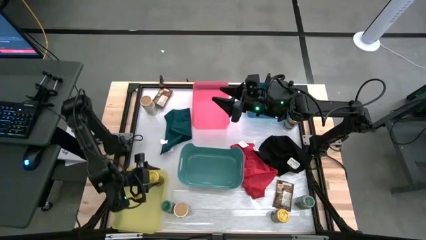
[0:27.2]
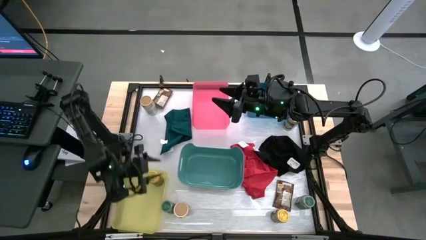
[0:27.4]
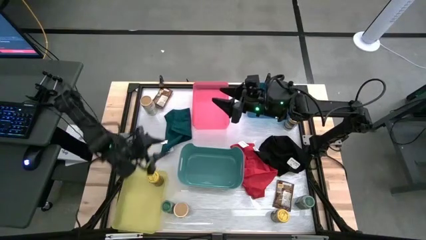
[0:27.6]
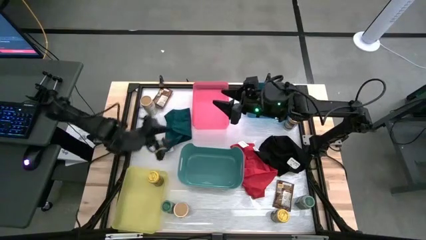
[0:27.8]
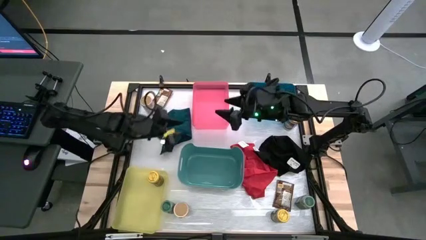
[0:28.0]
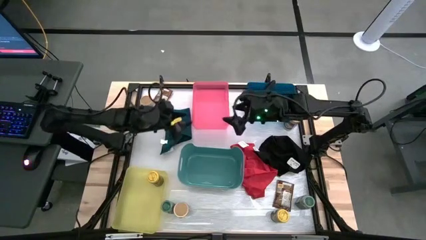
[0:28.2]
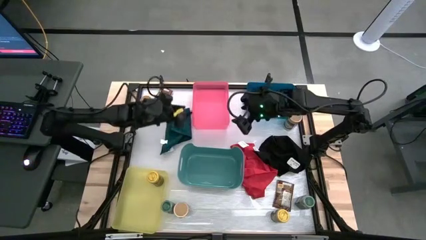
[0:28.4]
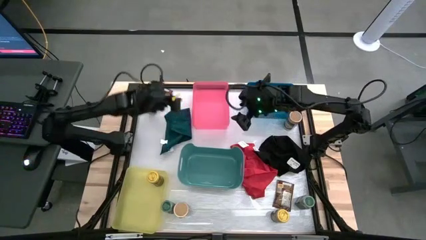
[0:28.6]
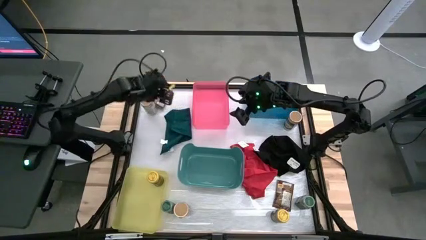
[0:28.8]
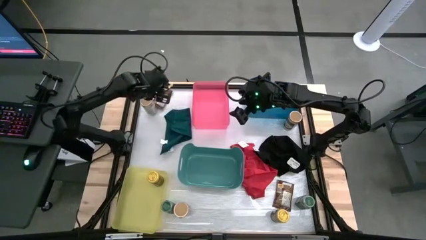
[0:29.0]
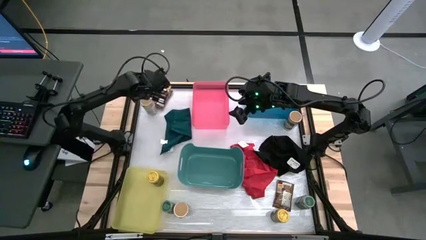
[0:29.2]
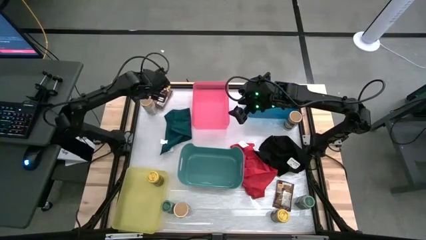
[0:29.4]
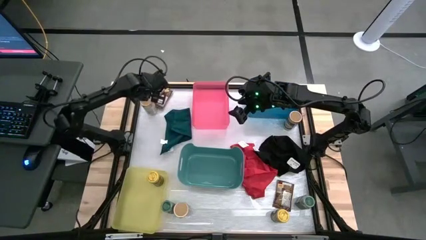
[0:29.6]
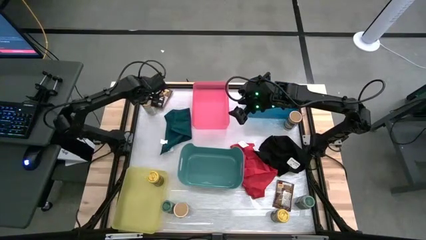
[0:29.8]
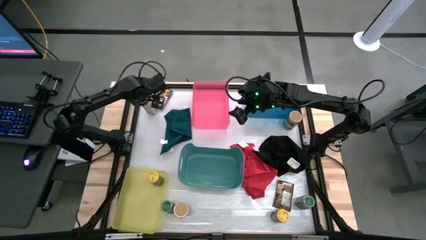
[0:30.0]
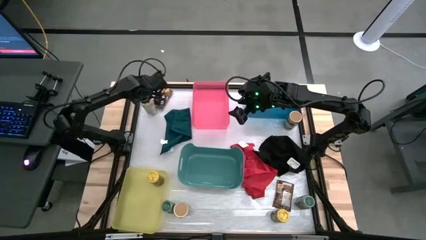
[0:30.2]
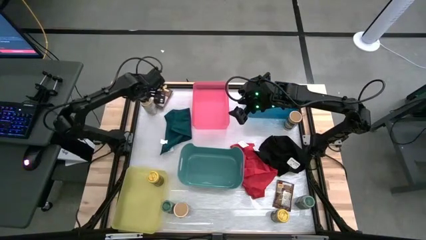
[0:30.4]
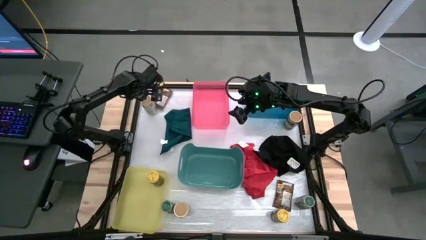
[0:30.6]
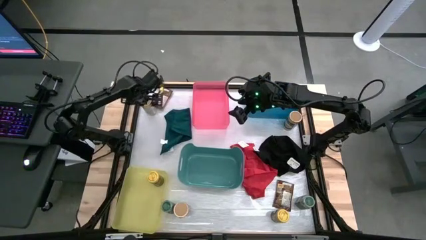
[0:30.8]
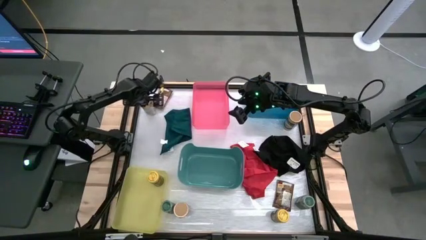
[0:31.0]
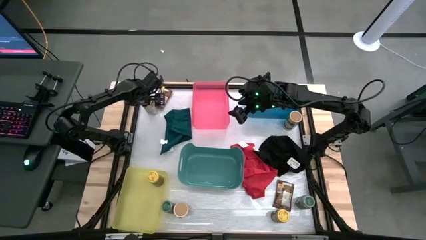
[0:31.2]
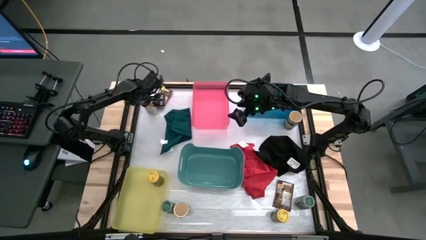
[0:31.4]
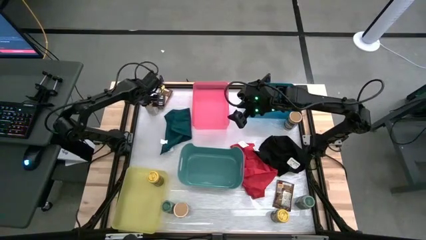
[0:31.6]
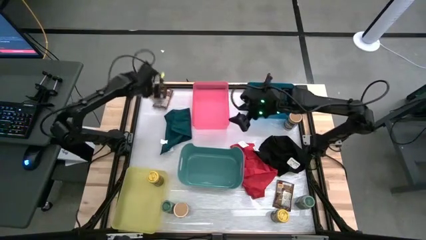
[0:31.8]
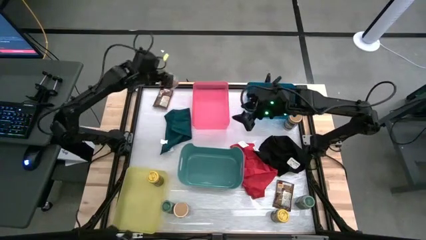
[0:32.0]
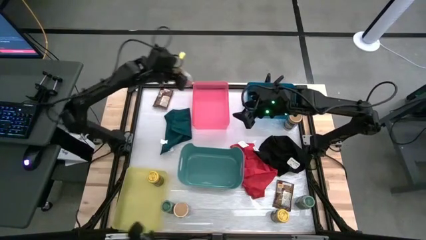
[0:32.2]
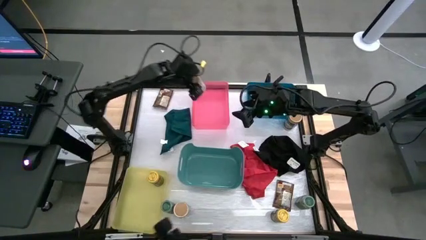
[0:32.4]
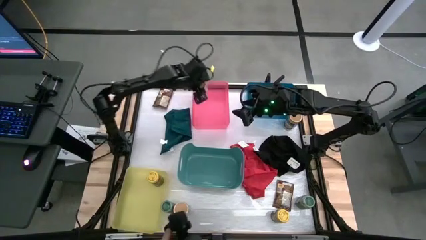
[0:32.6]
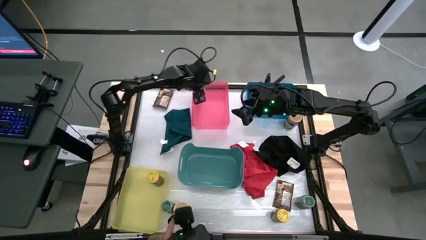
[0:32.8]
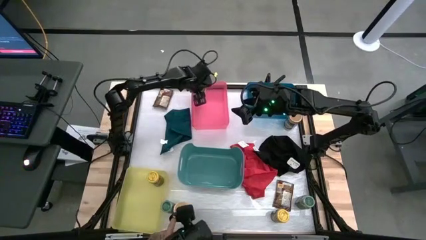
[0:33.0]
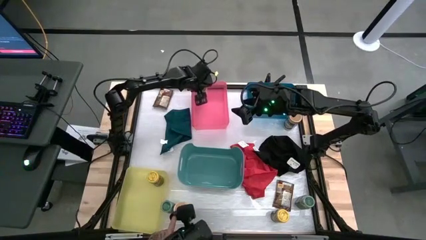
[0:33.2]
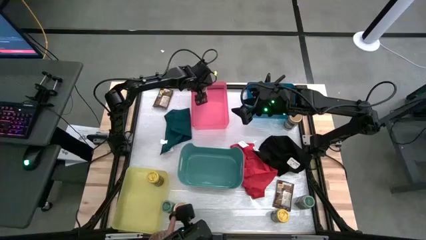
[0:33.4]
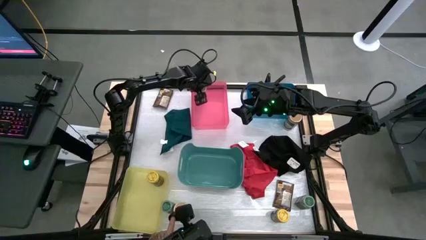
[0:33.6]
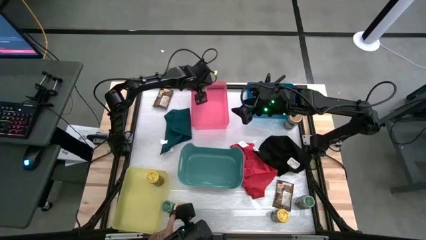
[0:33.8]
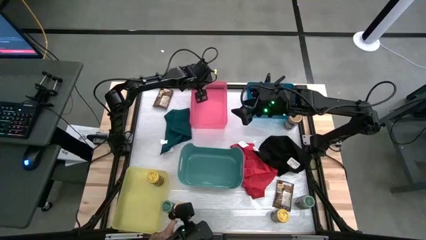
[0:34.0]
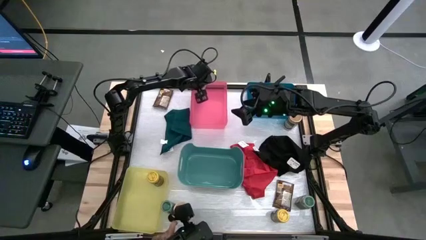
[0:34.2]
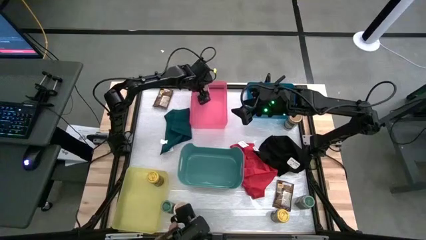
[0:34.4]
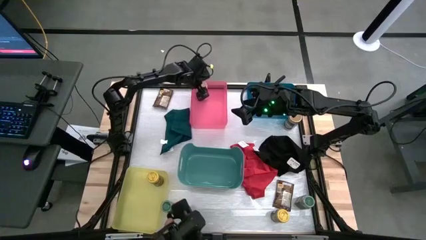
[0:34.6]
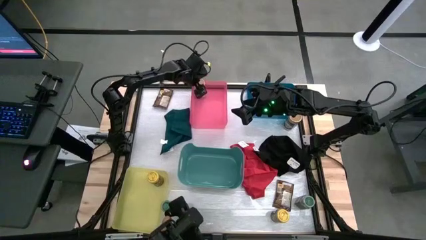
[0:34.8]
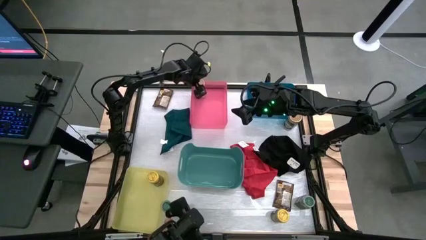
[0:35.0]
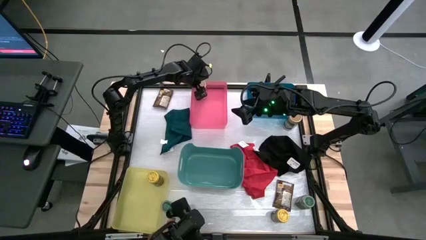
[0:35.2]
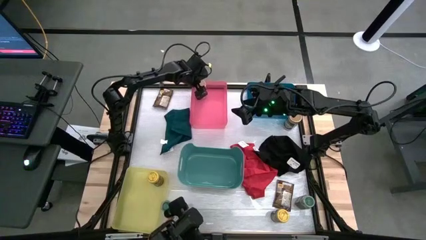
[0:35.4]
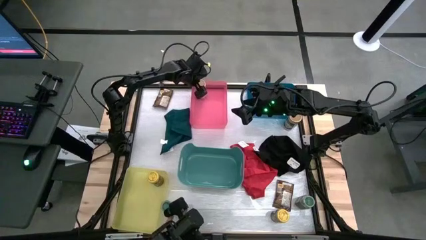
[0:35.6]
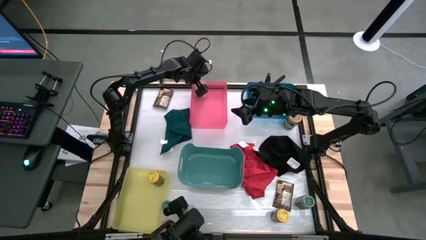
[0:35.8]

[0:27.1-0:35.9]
Task: Sort spices by type
Put the top left gold seasoning bottle into the pink bin

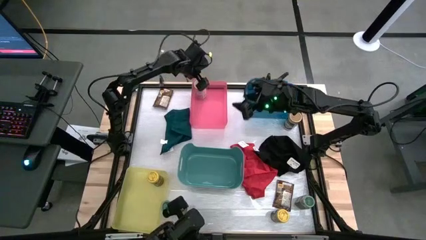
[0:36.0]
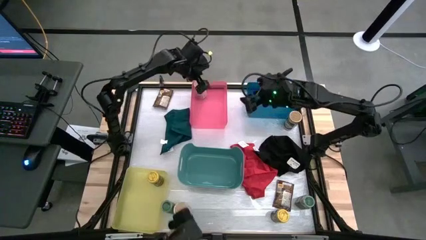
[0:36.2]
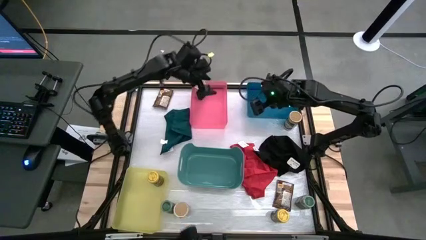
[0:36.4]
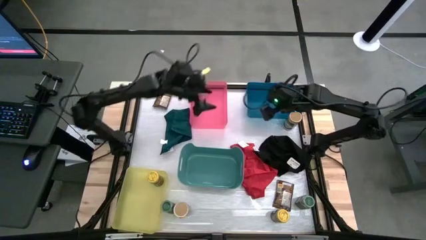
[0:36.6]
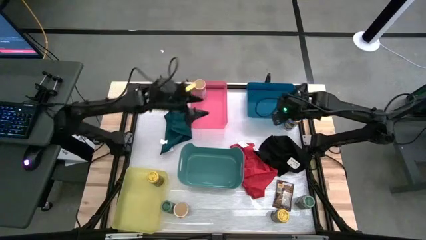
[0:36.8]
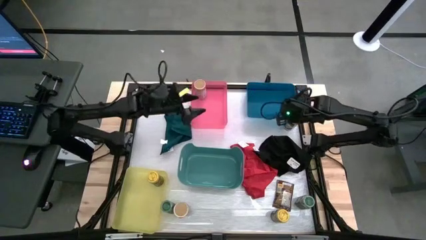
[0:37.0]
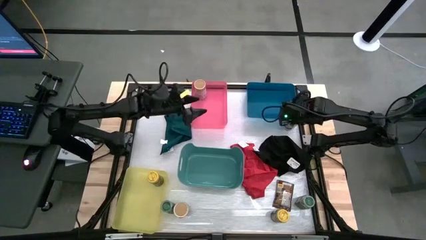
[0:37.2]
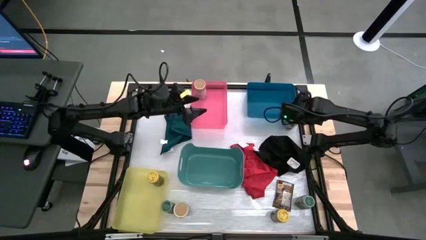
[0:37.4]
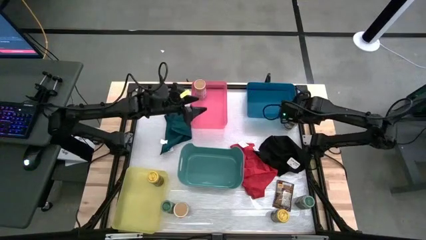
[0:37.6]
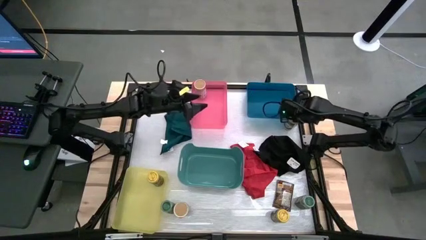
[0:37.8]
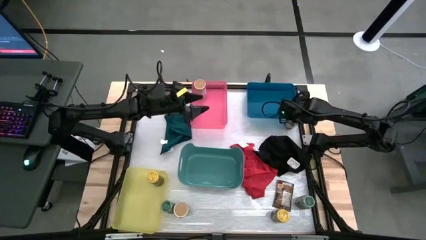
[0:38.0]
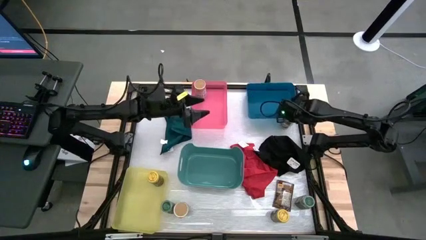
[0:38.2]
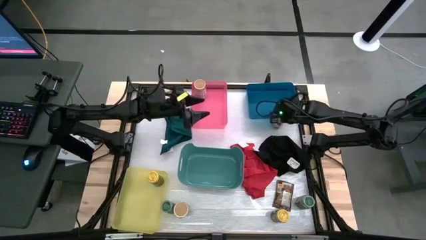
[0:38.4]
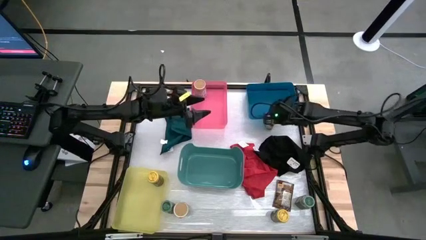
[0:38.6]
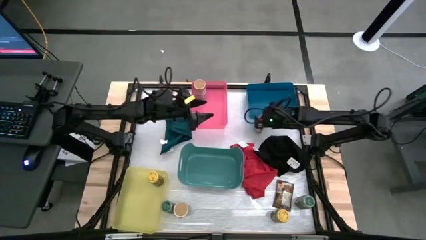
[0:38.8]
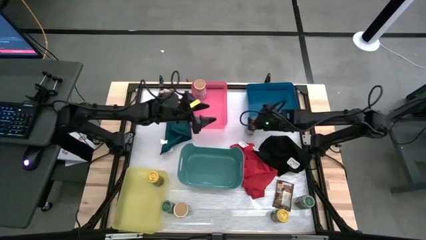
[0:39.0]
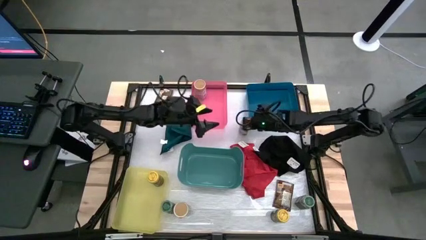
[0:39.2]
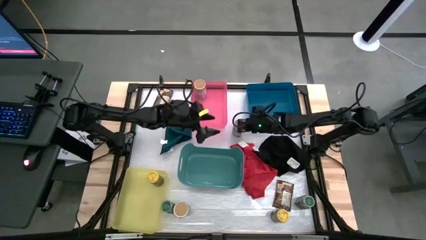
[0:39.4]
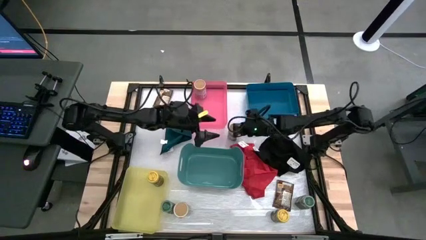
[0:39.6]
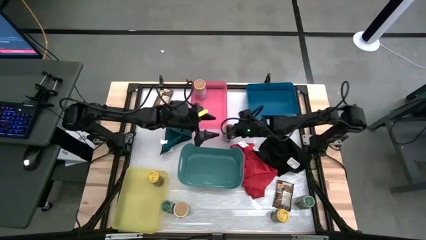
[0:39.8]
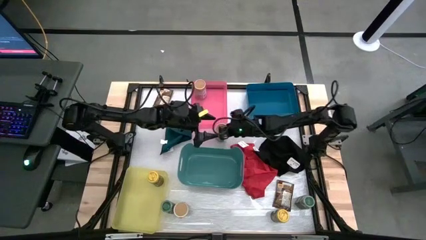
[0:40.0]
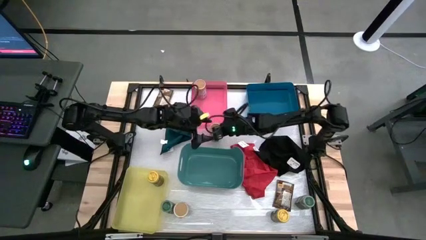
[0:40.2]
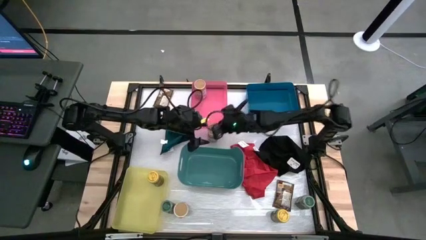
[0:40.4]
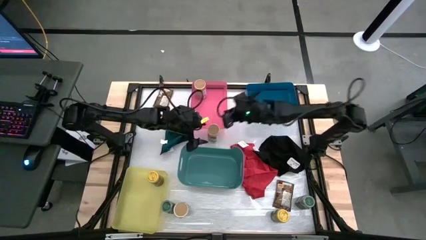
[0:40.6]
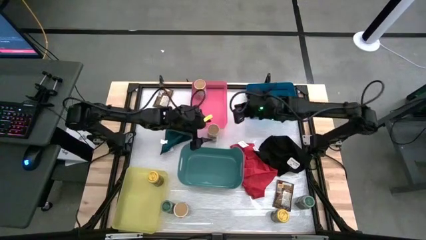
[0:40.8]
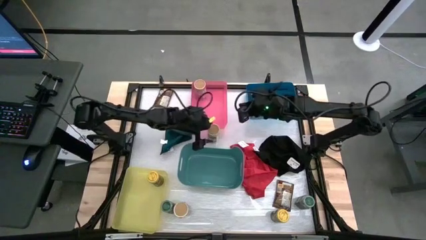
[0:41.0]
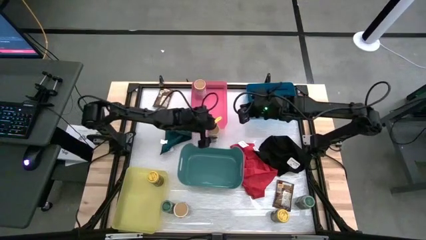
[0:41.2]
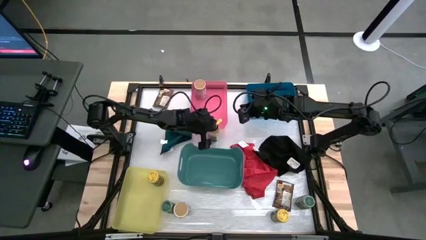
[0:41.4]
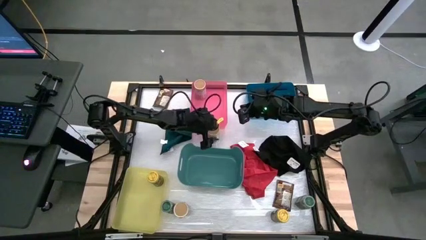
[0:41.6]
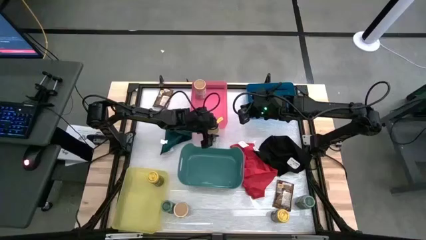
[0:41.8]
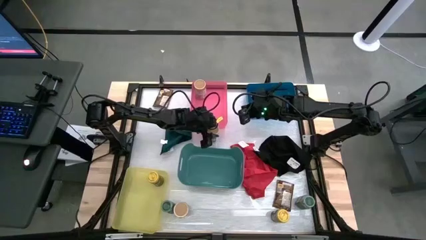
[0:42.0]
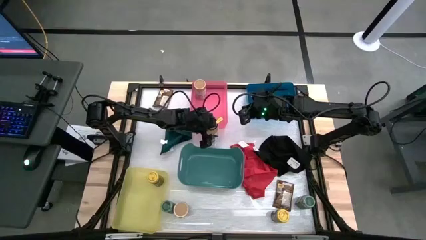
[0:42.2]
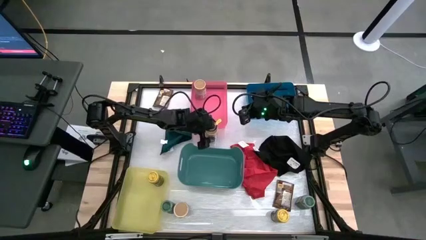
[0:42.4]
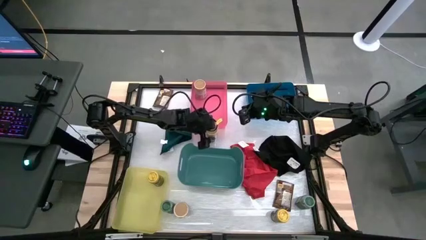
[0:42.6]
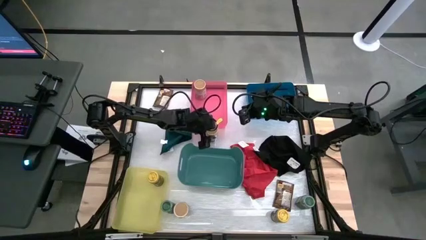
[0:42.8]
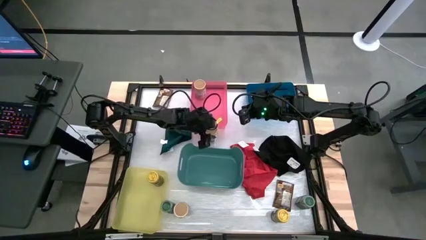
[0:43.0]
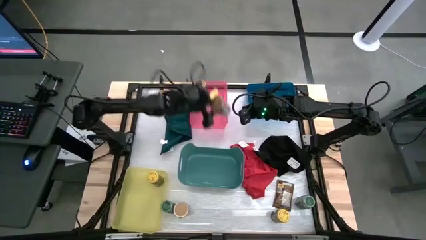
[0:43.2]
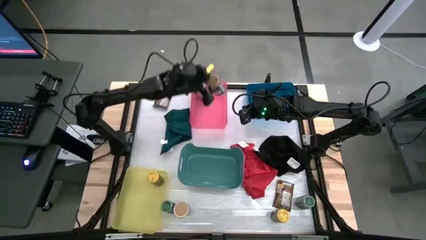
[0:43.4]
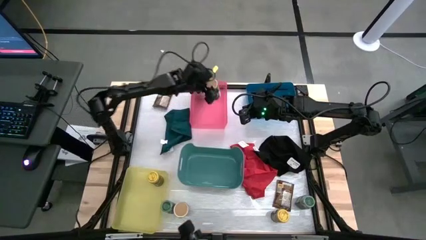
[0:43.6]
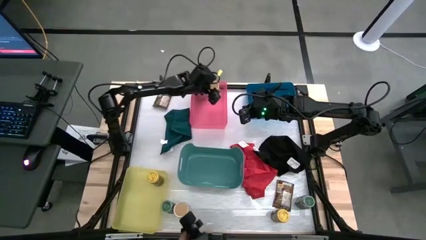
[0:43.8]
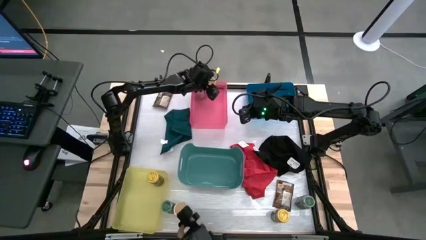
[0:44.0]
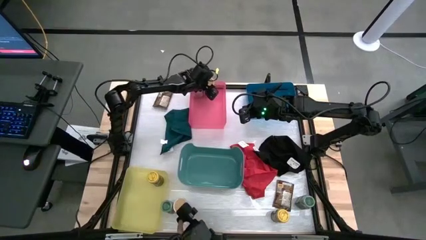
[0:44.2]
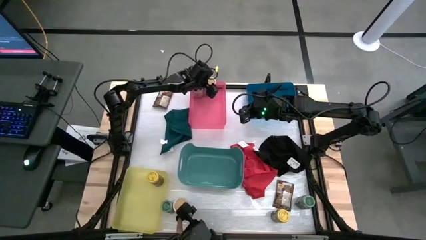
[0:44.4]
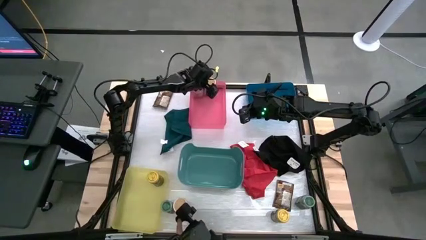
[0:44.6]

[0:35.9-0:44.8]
Put the top gold seasoning bottle into the pink bin
